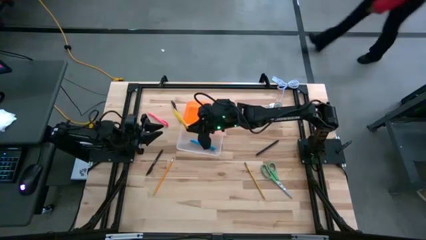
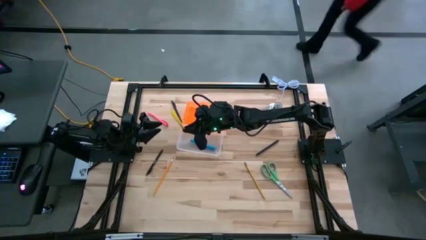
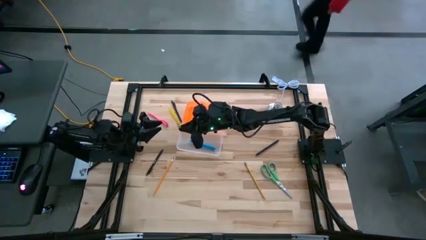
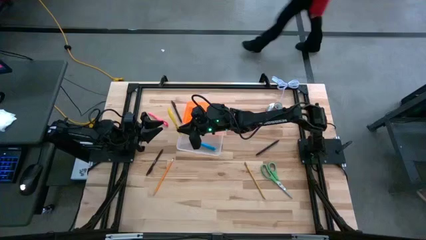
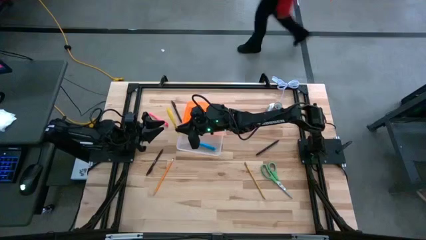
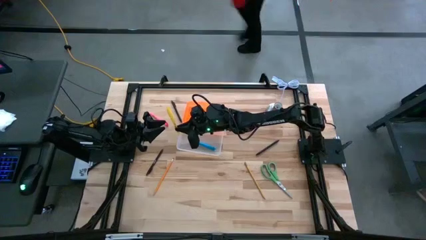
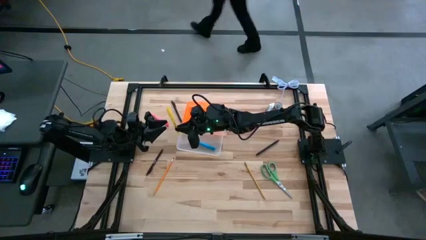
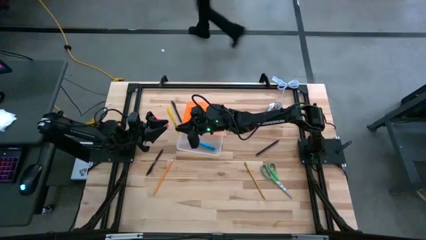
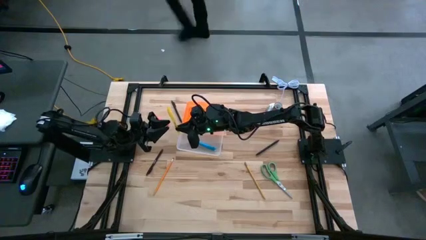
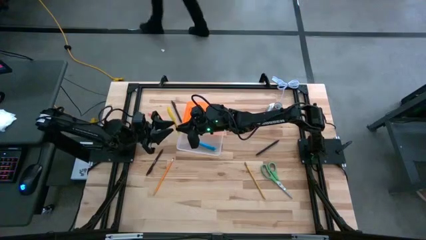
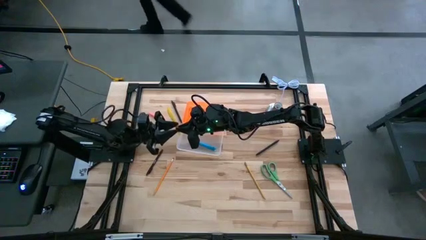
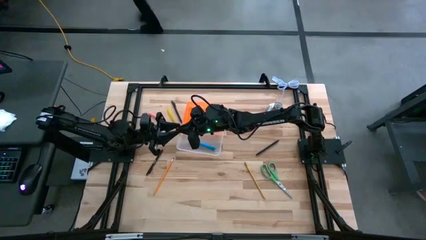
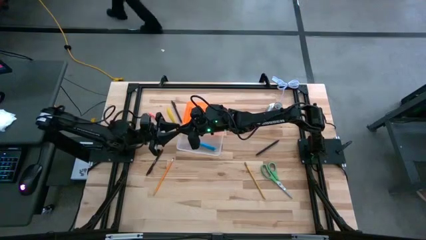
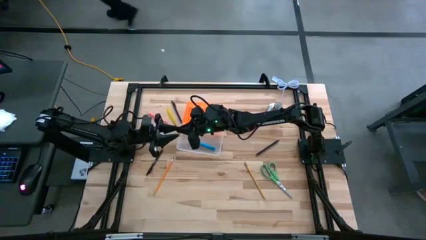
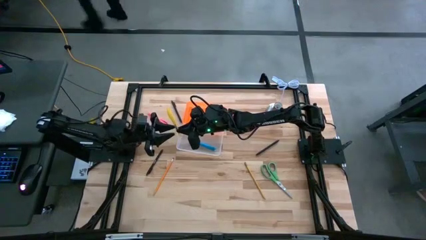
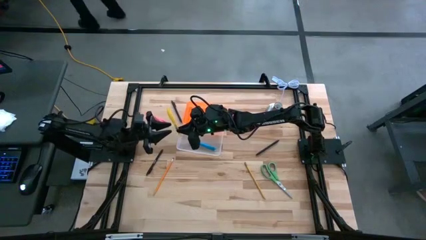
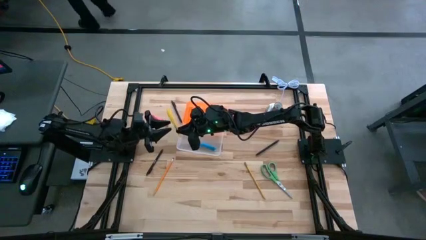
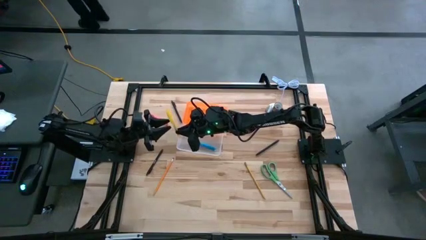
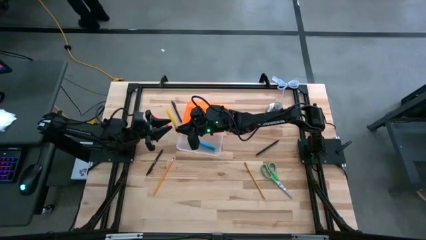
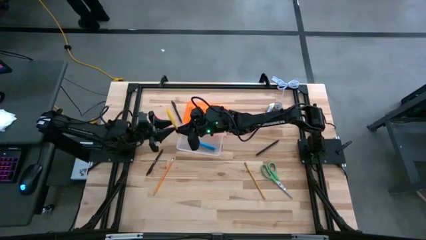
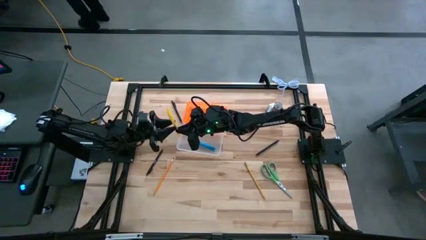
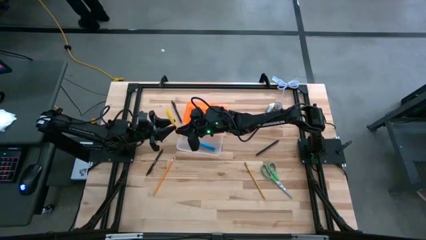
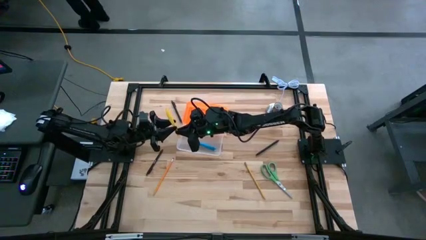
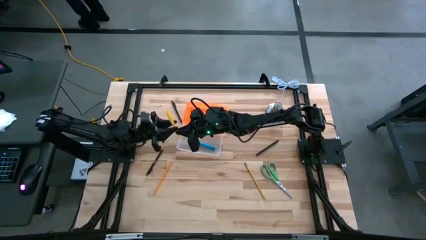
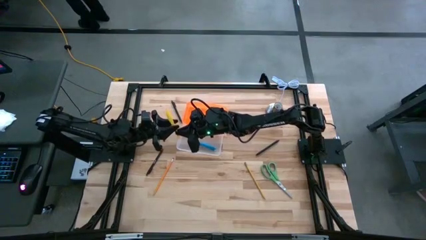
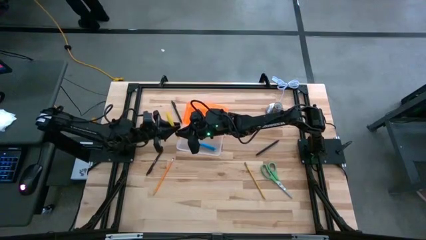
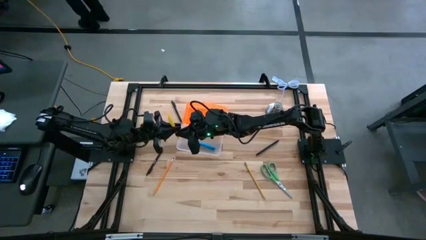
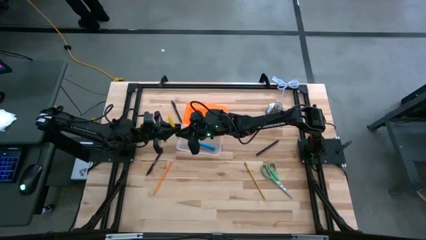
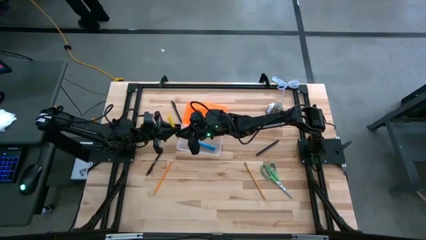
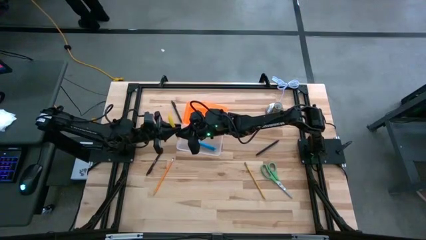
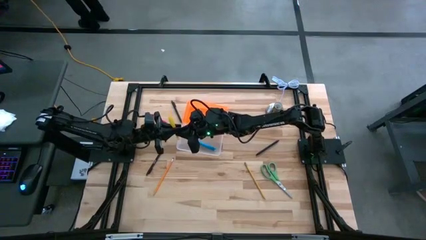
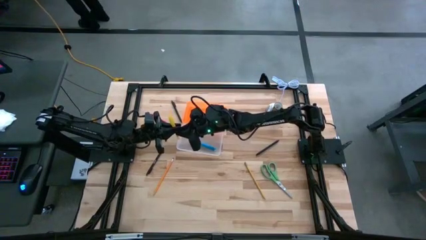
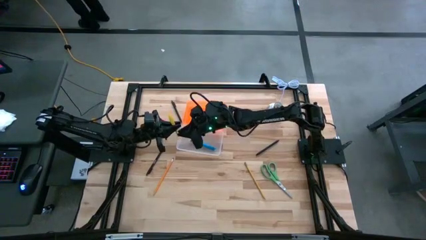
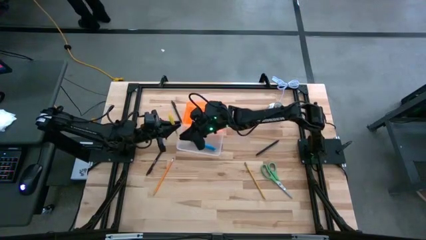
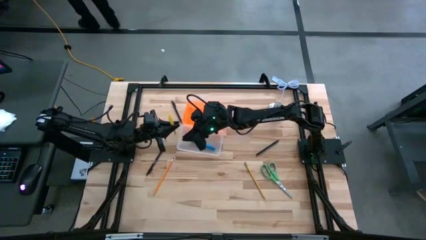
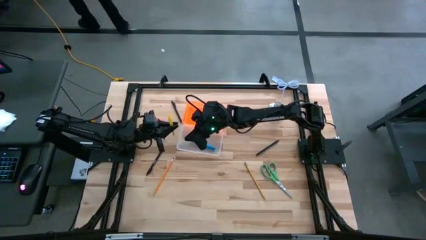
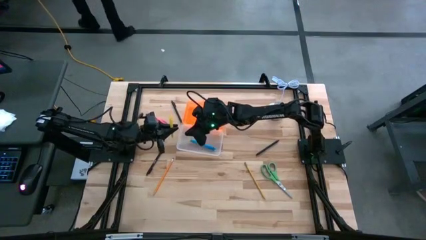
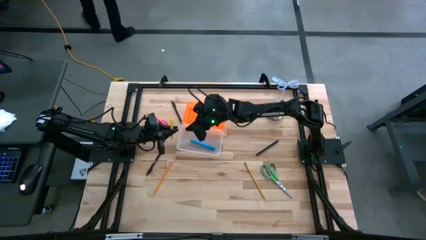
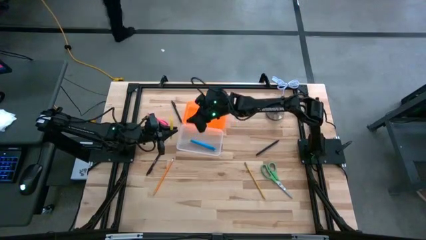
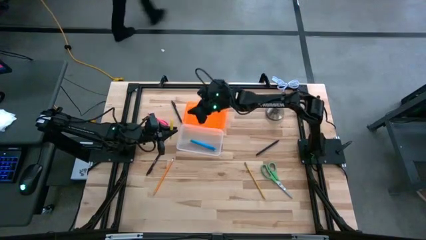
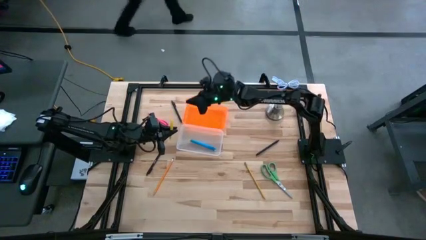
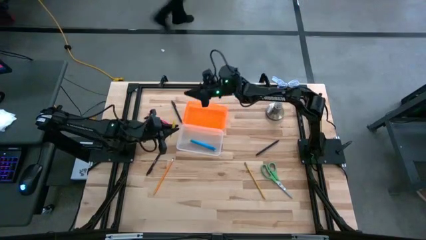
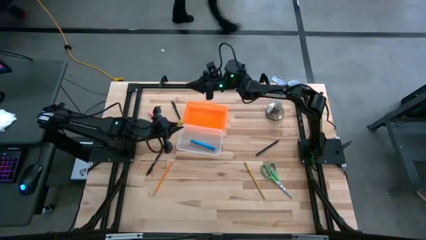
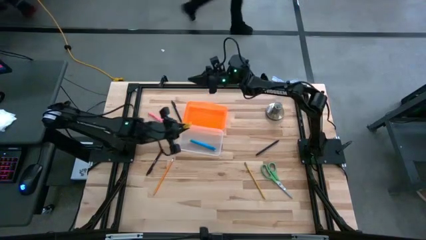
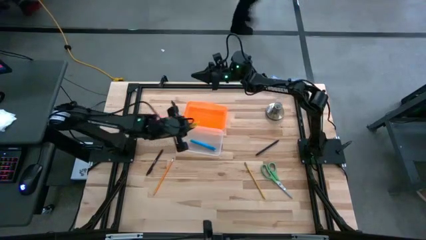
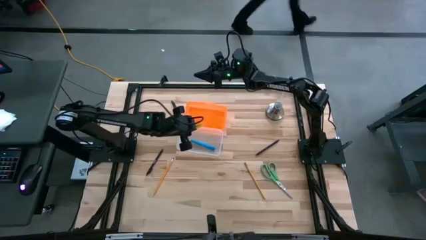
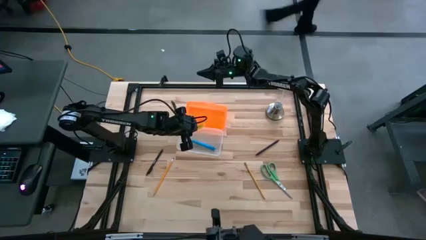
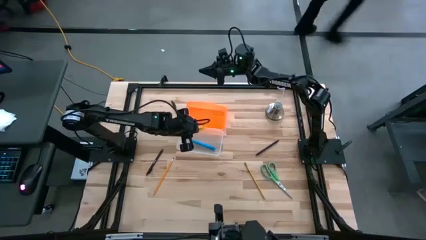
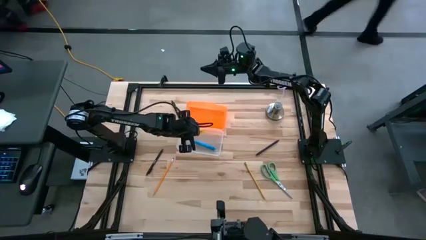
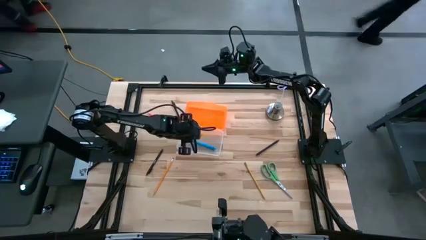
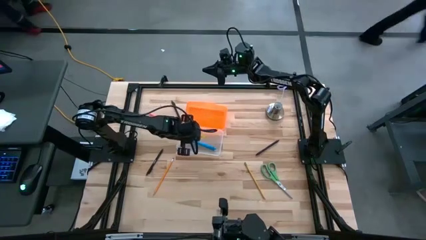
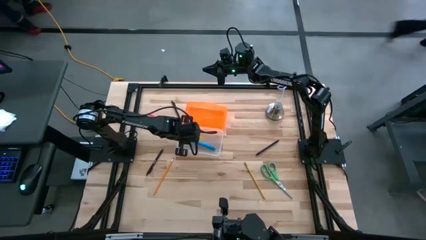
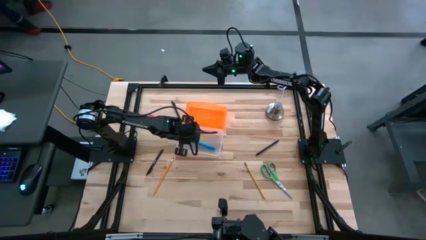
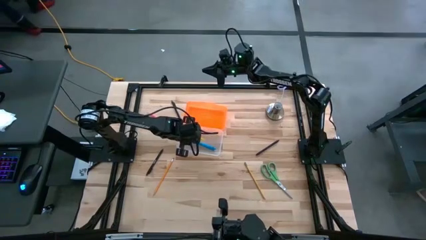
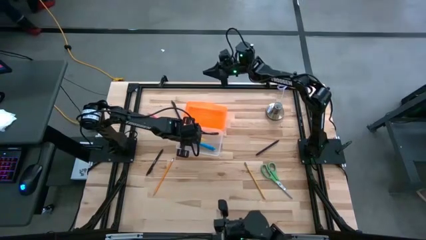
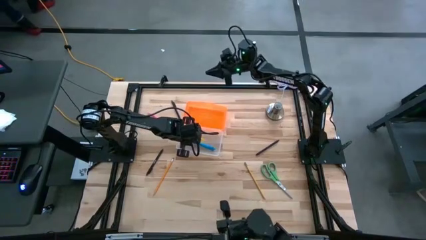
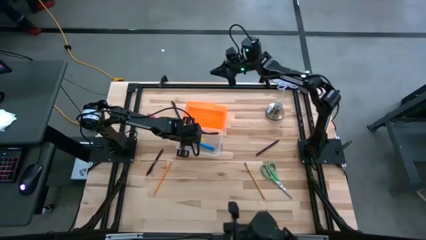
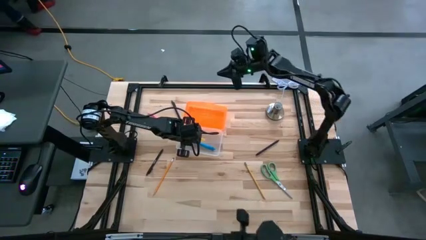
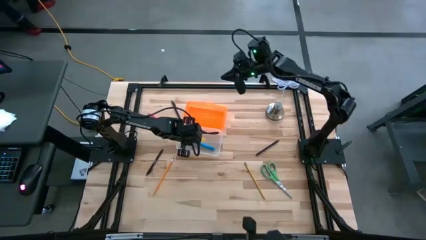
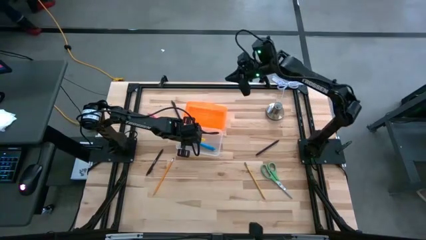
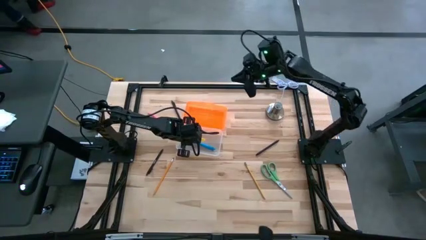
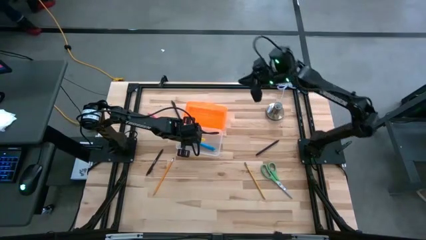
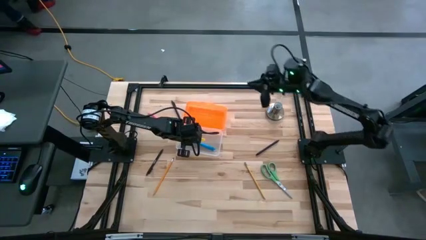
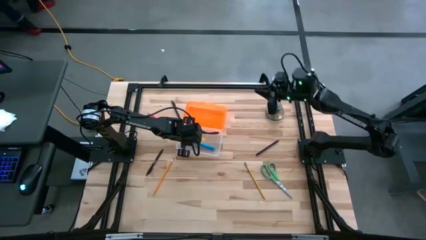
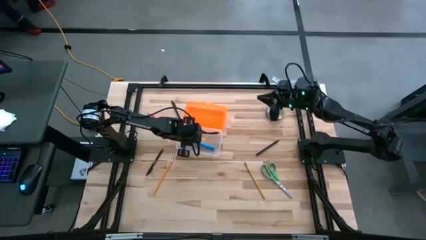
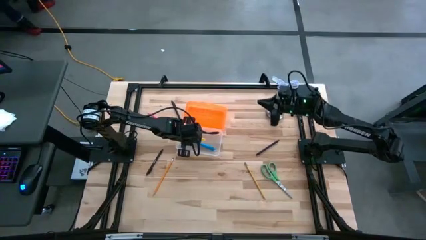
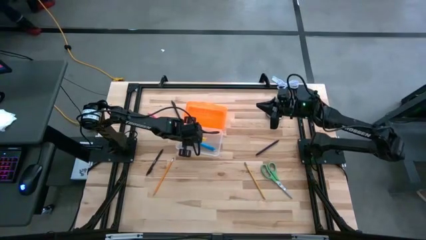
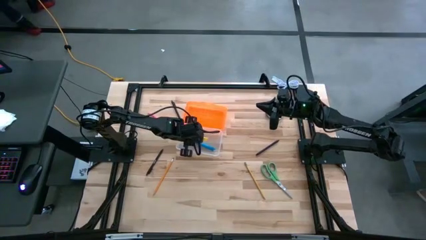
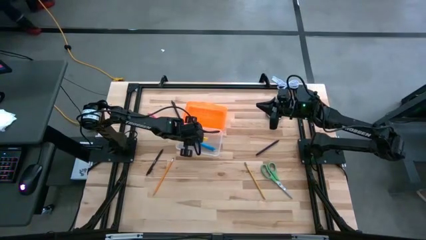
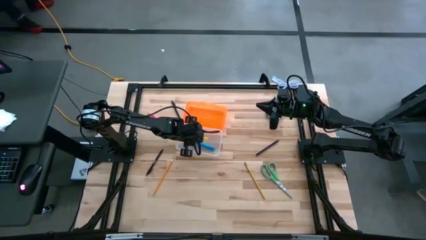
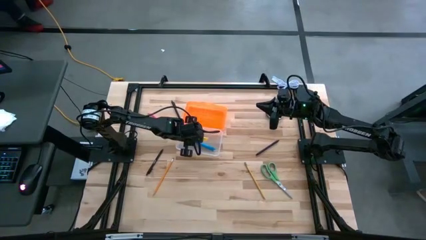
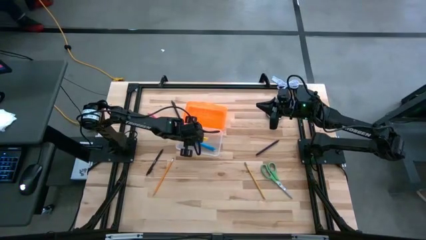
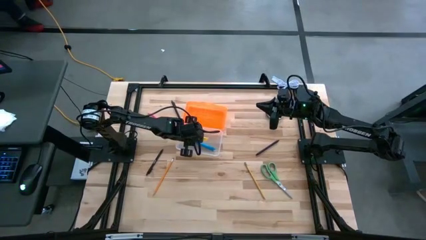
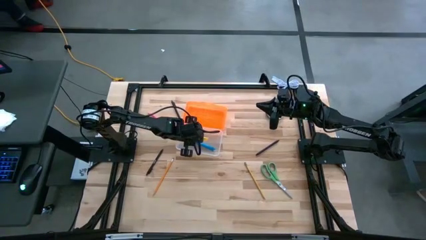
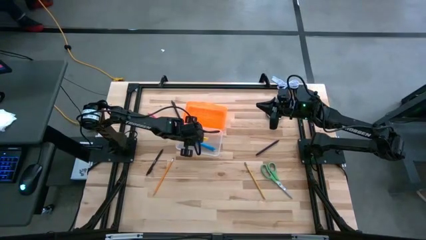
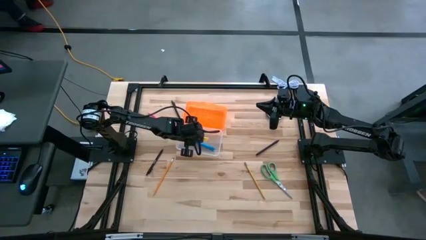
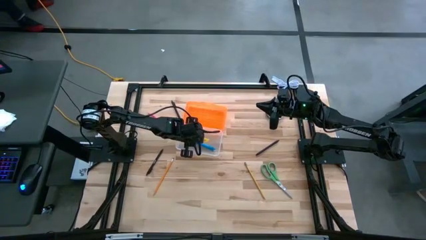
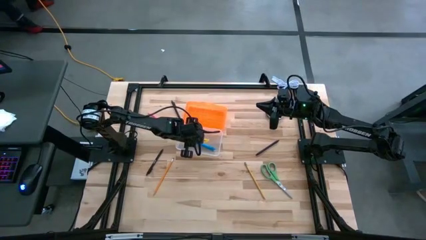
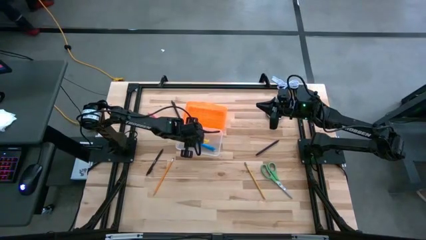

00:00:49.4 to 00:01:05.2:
Task: Pick & place school supplies into a supply box
Put the yellow pen into the orange supply box
